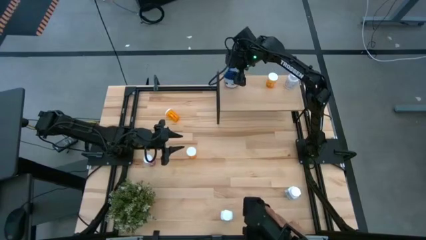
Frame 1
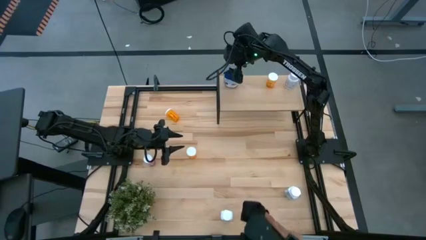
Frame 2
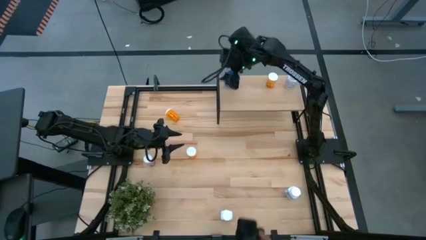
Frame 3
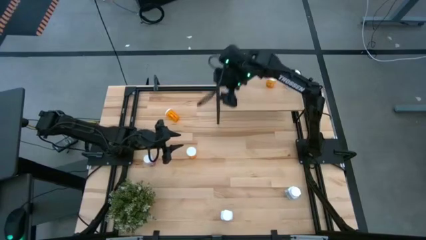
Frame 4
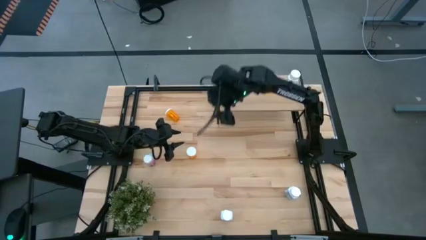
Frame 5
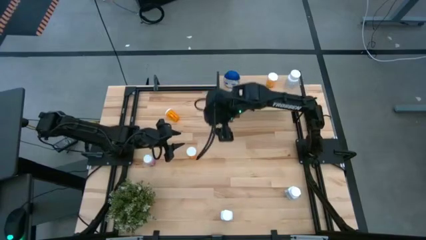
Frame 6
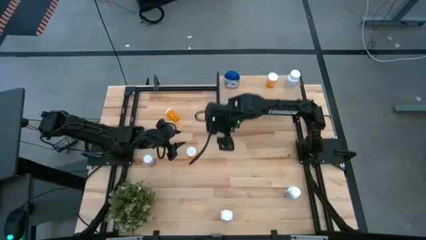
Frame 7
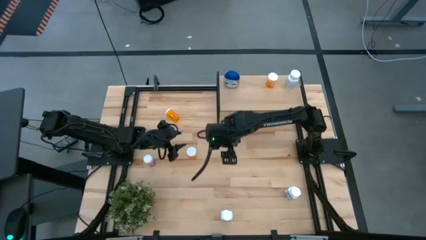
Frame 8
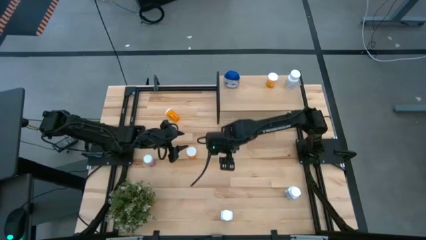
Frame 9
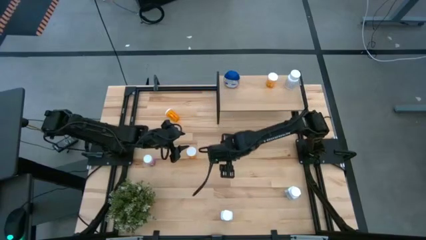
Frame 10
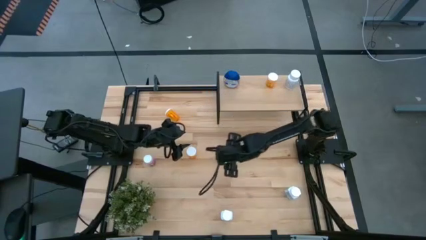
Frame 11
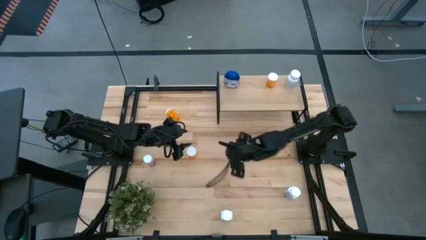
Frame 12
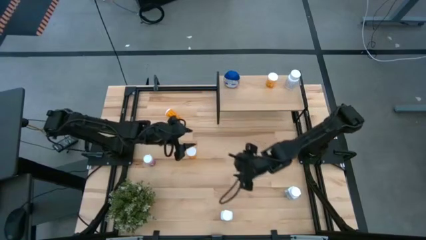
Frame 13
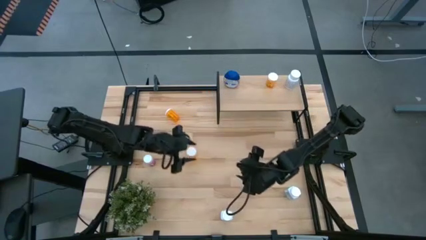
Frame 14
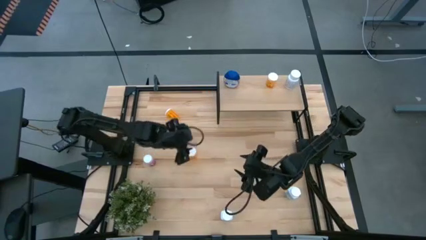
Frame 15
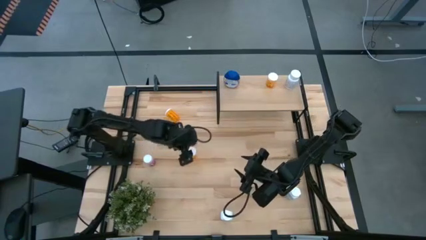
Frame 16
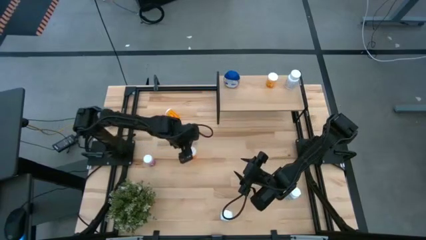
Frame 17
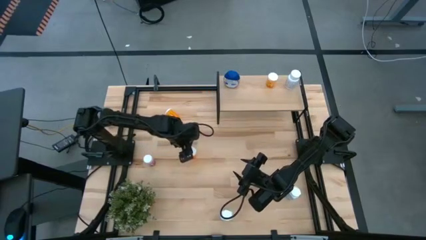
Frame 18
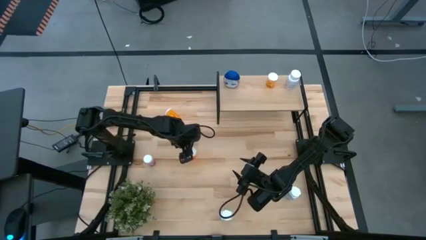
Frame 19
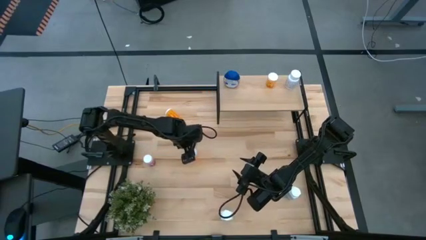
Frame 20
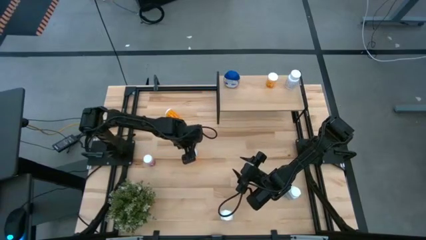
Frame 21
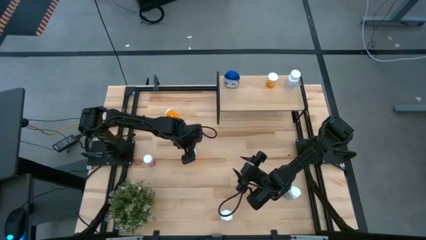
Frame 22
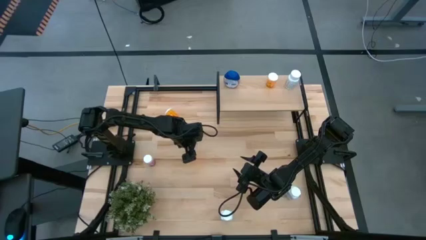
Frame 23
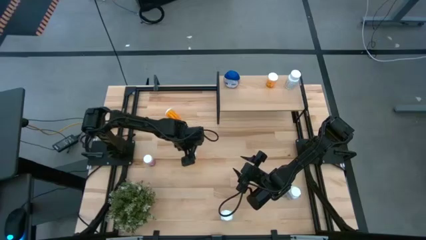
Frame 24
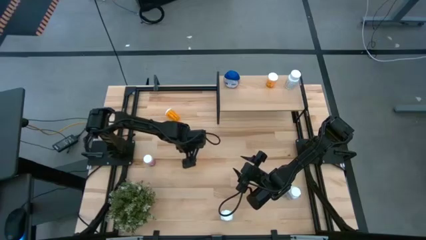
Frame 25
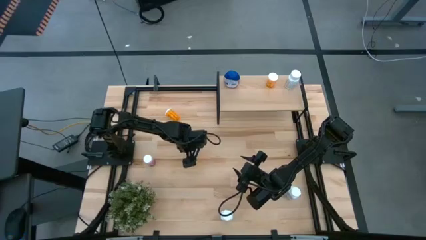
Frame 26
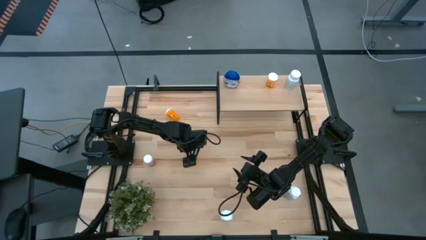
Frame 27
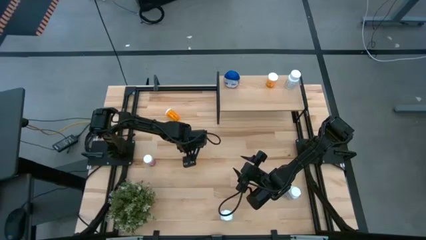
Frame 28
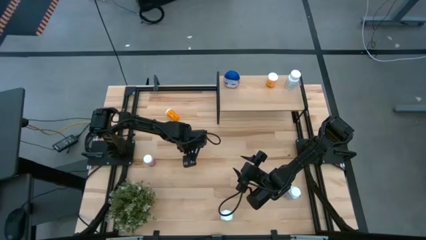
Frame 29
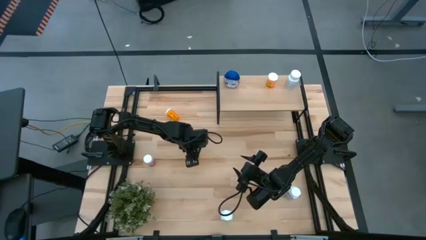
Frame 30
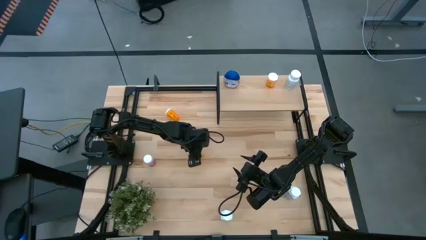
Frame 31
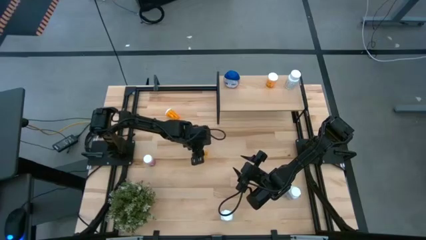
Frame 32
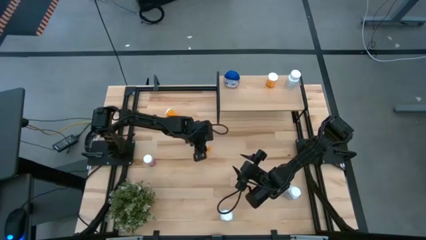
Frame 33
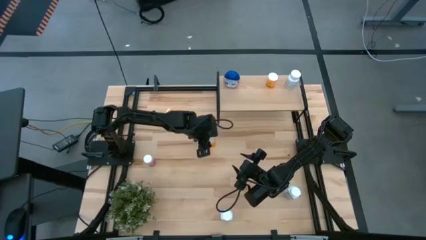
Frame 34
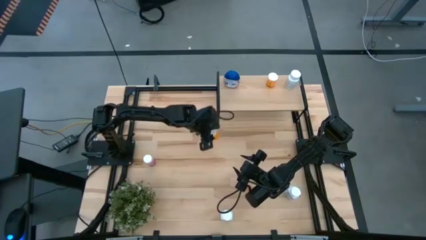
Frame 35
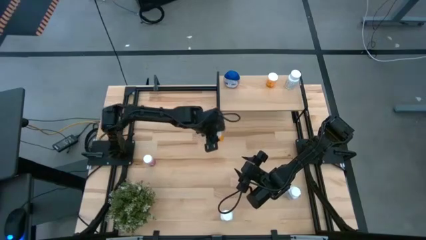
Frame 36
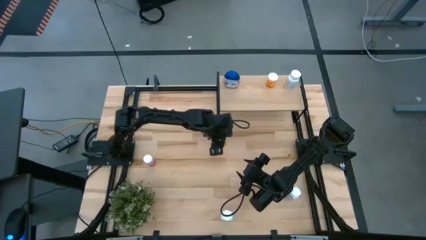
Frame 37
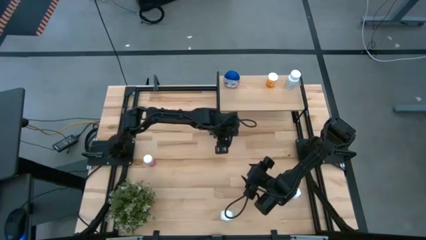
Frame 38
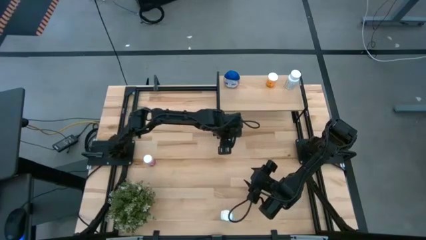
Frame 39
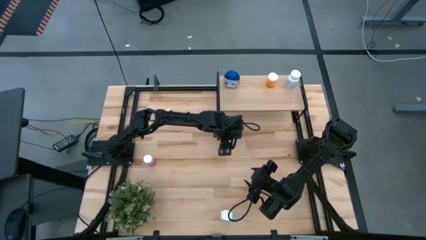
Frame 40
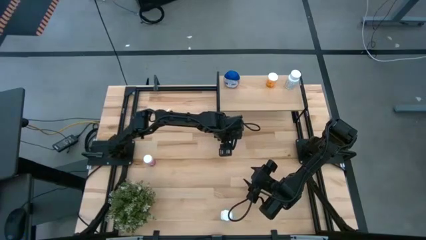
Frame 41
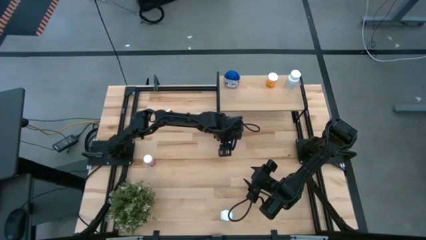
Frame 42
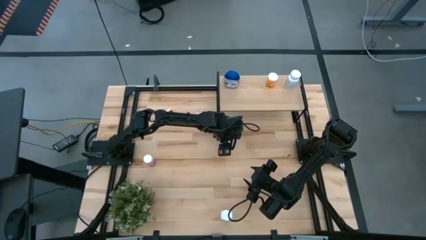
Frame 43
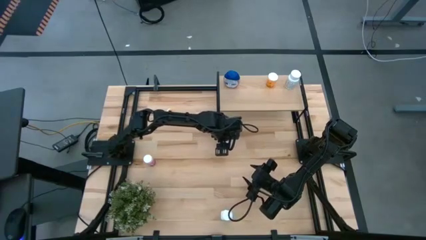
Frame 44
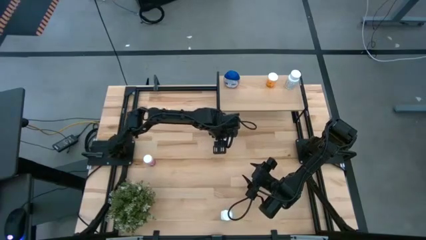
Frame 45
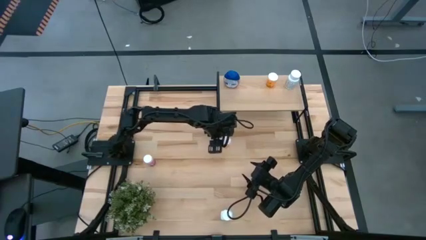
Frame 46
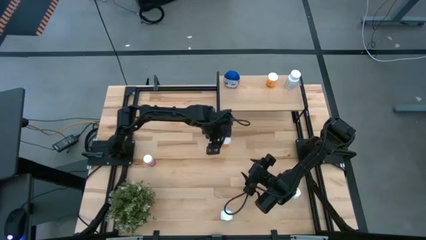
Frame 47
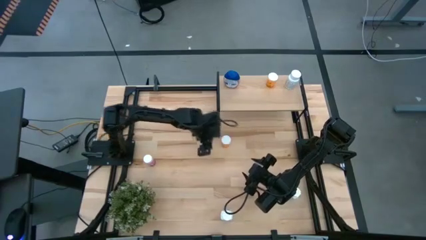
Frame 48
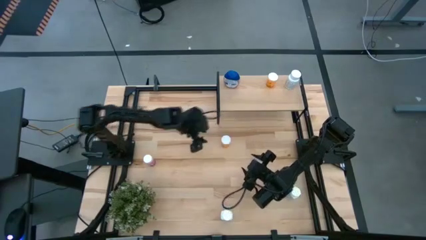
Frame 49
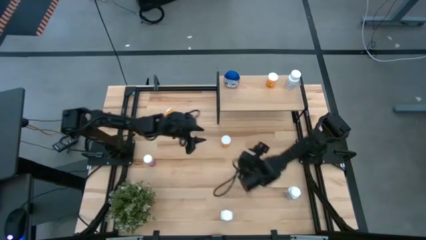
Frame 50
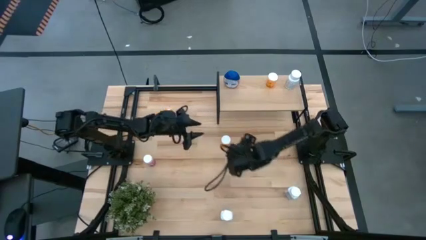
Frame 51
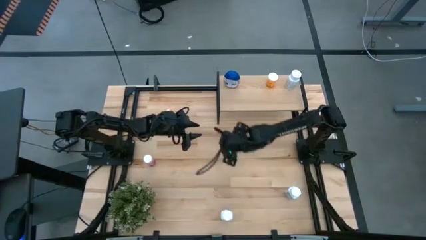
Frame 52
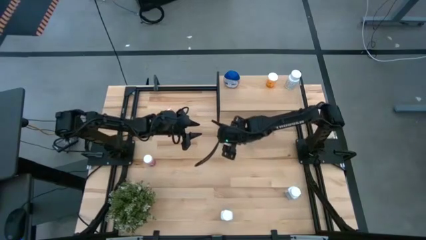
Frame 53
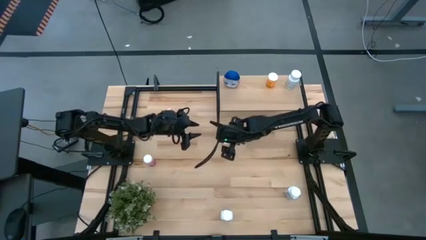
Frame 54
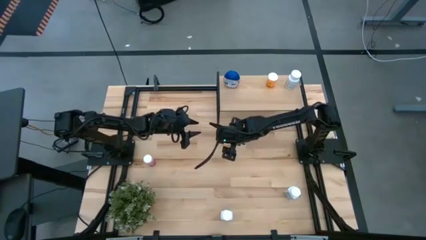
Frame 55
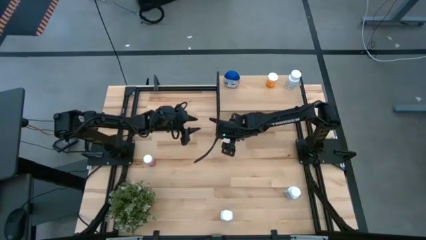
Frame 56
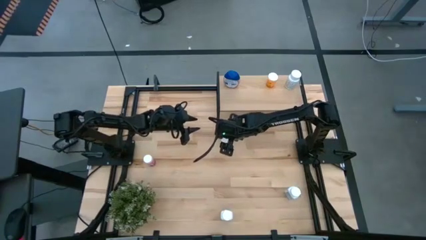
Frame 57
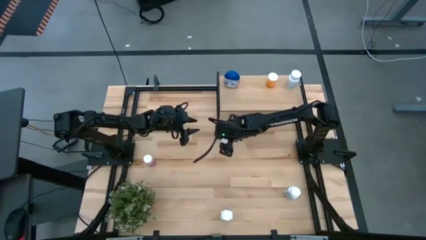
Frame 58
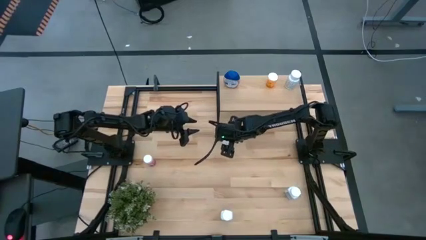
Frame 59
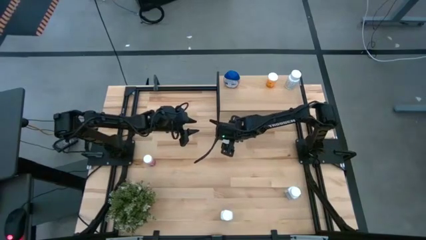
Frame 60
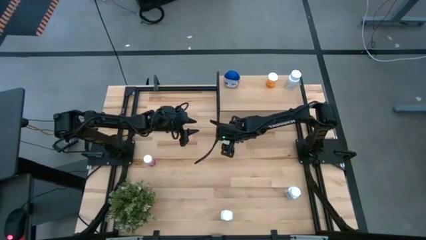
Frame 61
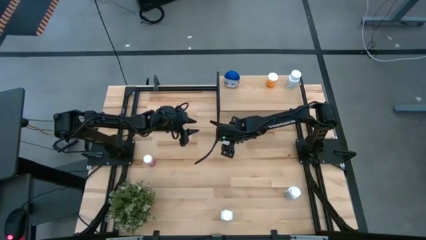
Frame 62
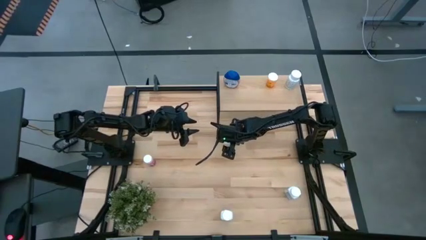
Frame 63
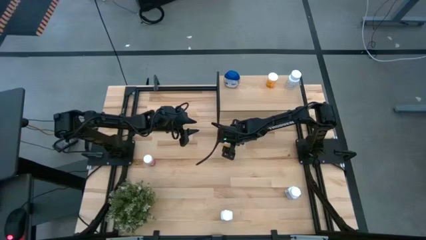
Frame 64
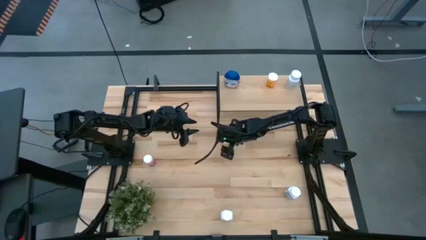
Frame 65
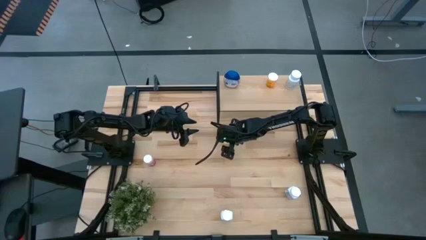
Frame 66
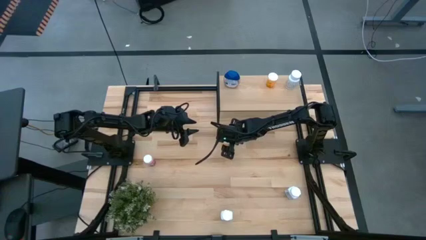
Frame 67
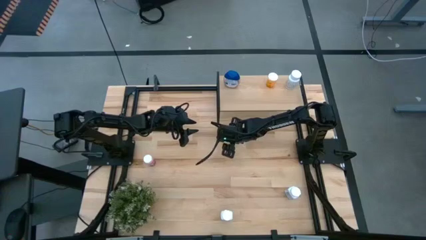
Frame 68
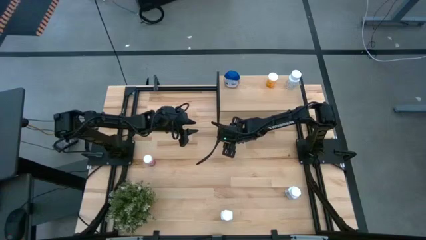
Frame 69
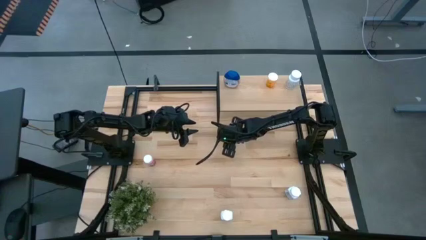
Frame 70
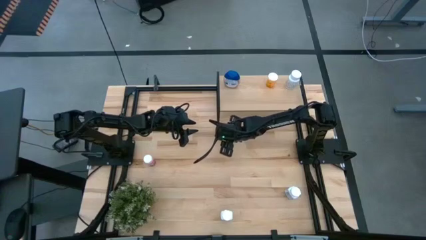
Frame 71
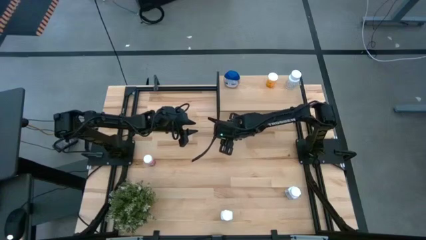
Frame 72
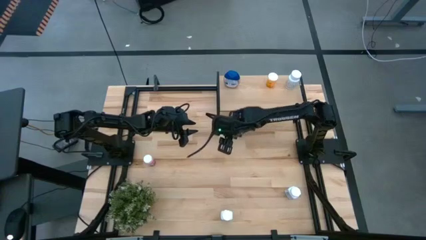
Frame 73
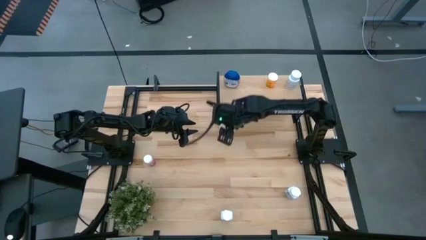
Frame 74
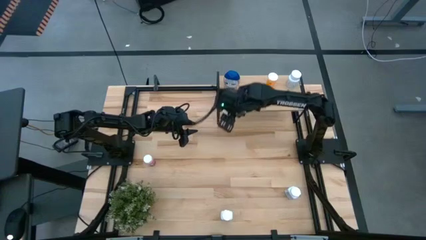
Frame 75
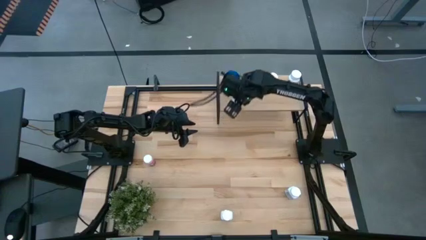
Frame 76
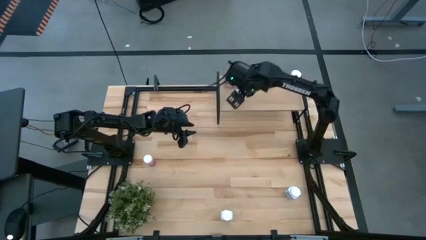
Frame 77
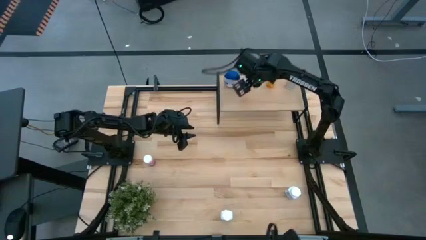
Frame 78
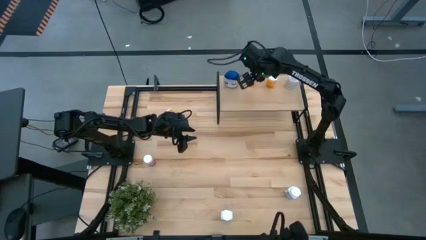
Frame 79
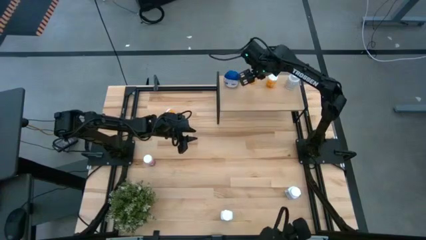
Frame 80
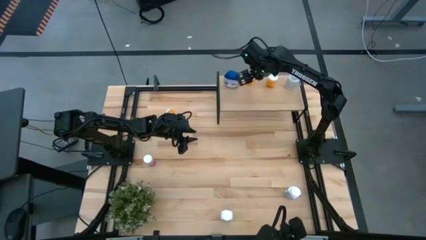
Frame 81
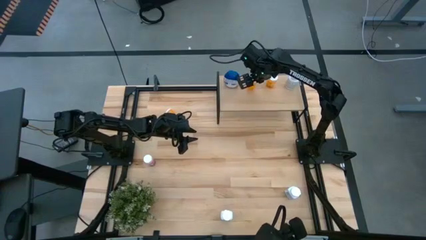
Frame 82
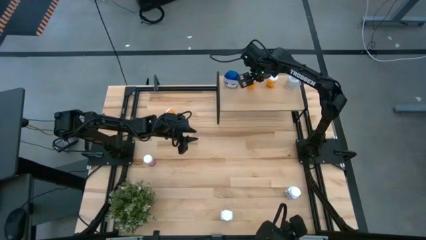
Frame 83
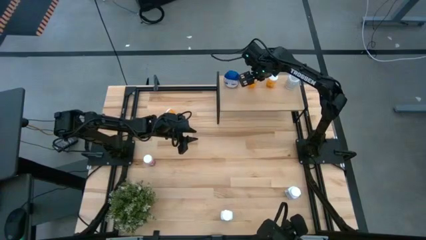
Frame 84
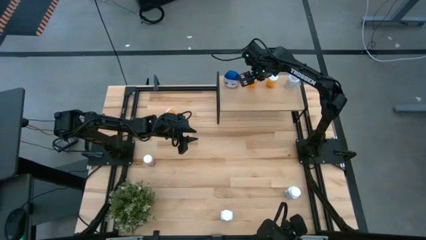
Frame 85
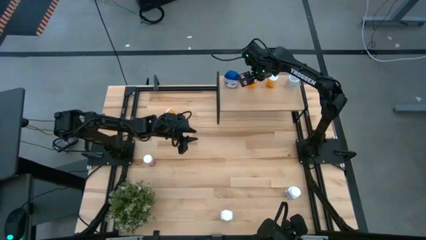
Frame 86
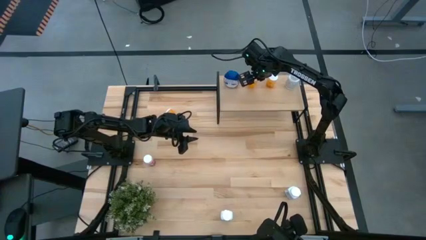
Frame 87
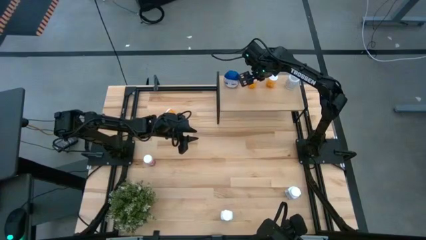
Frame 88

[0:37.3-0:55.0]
Task: Pick and place medicine bottles onto shelf by color
Put the bottom orange pill bottle on the shelf
